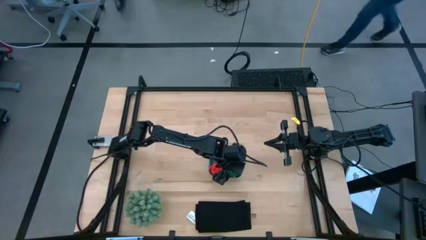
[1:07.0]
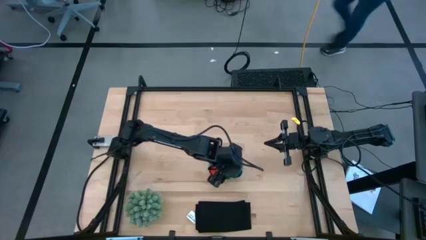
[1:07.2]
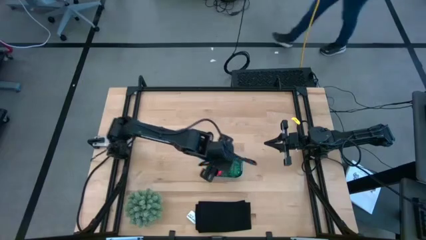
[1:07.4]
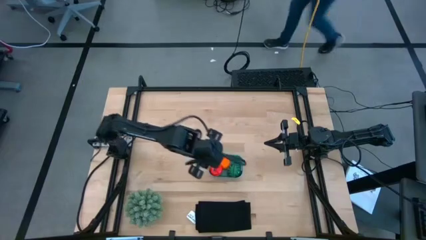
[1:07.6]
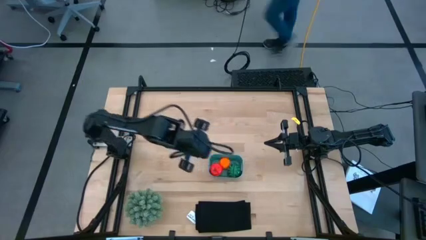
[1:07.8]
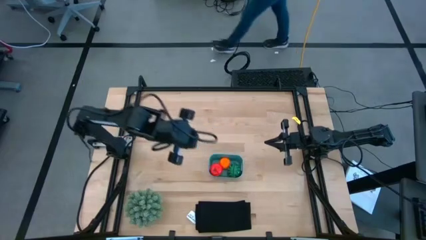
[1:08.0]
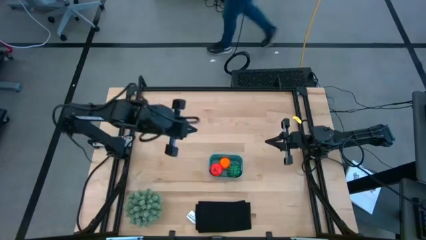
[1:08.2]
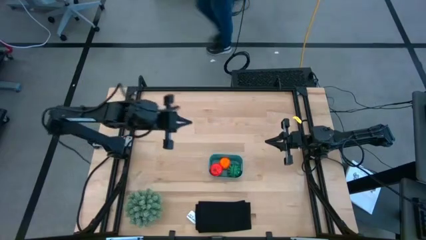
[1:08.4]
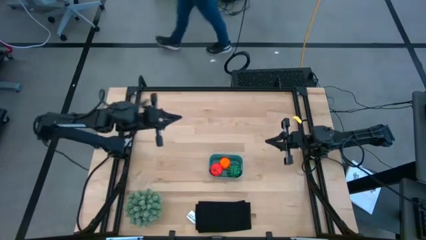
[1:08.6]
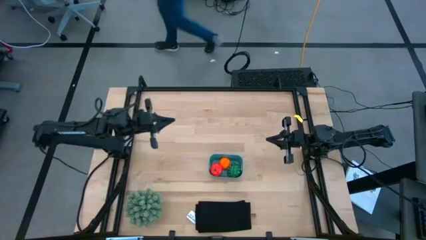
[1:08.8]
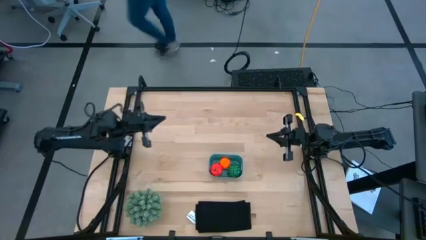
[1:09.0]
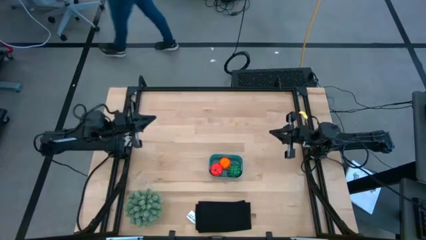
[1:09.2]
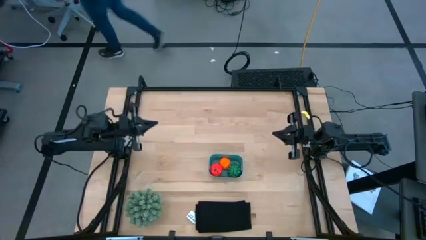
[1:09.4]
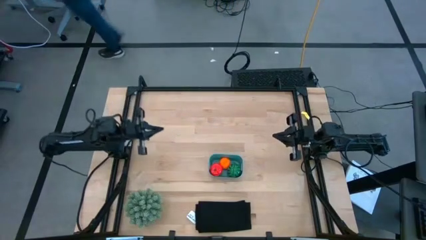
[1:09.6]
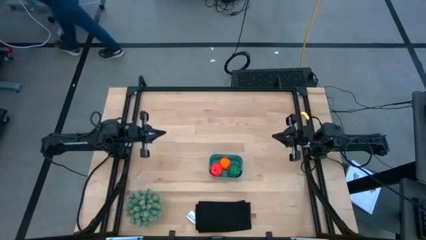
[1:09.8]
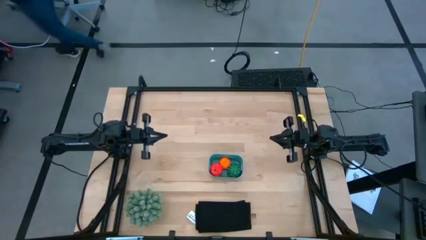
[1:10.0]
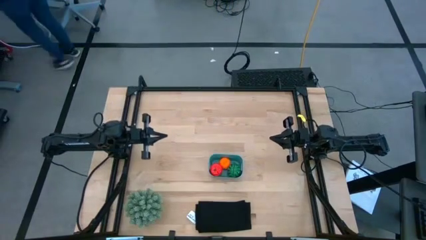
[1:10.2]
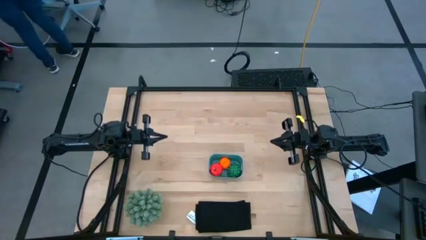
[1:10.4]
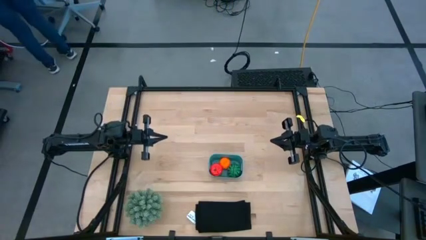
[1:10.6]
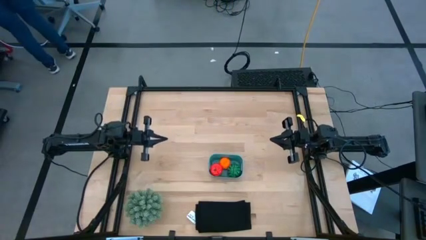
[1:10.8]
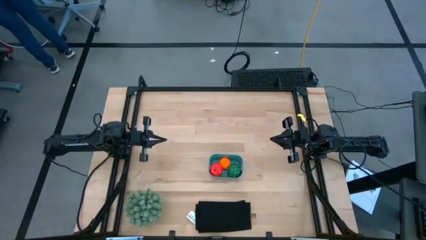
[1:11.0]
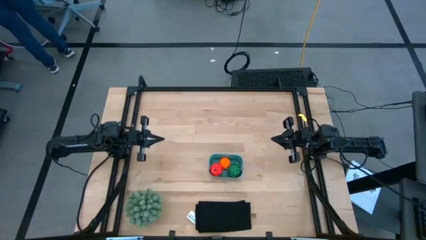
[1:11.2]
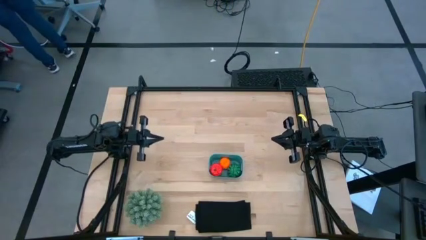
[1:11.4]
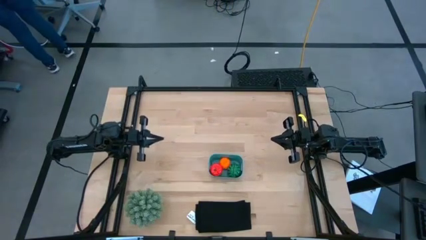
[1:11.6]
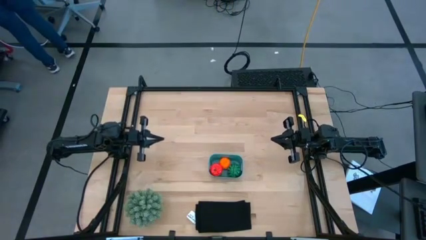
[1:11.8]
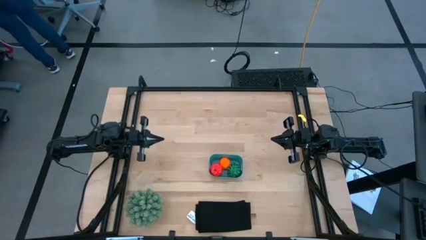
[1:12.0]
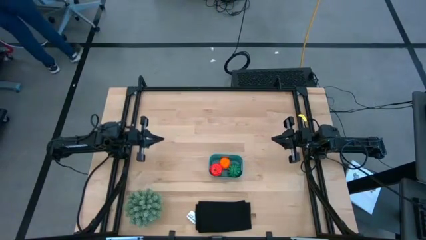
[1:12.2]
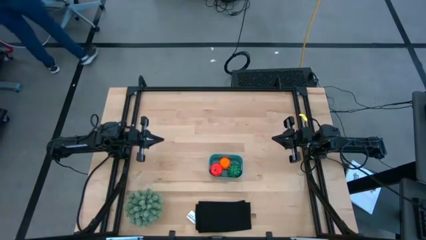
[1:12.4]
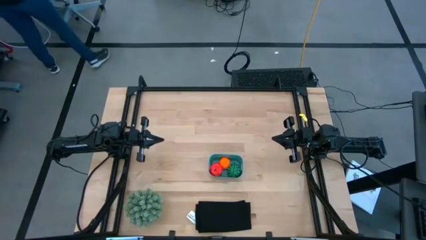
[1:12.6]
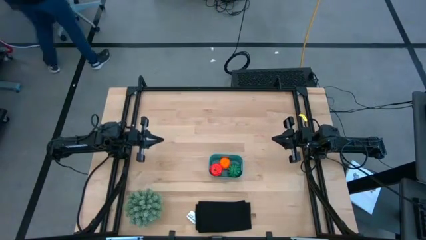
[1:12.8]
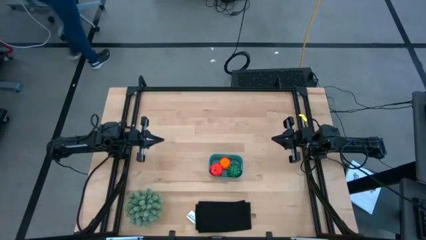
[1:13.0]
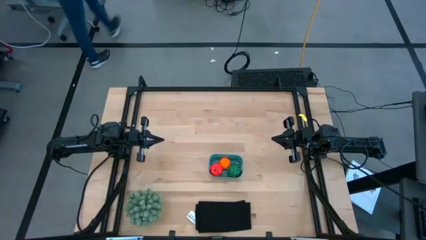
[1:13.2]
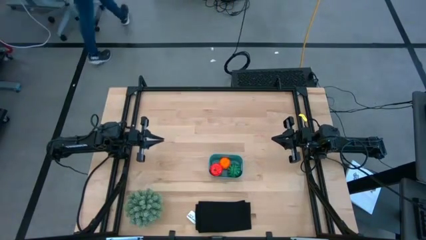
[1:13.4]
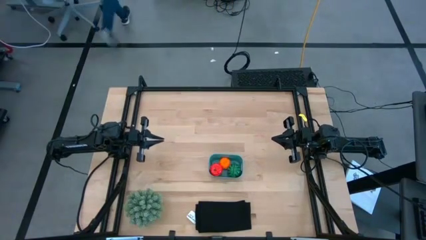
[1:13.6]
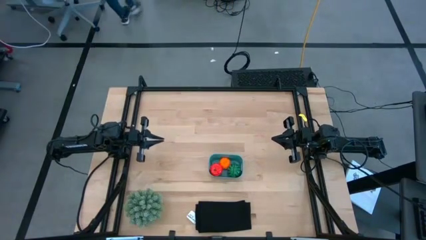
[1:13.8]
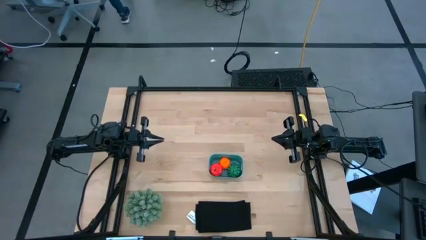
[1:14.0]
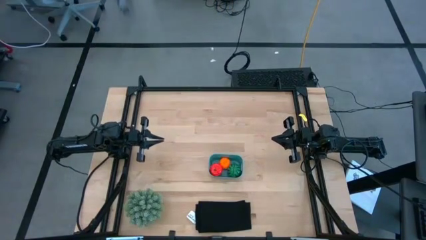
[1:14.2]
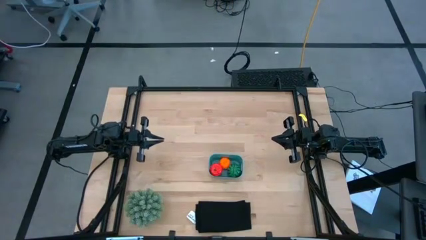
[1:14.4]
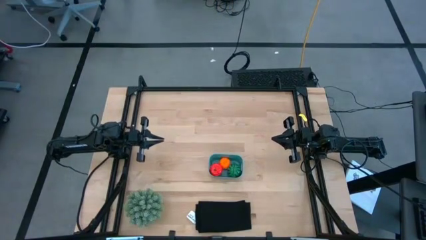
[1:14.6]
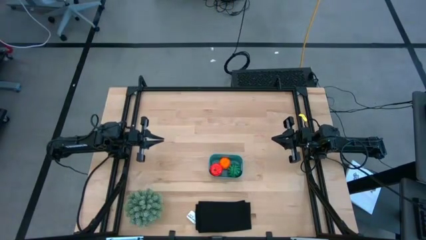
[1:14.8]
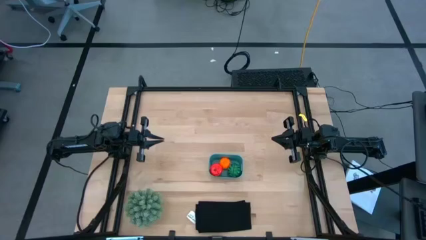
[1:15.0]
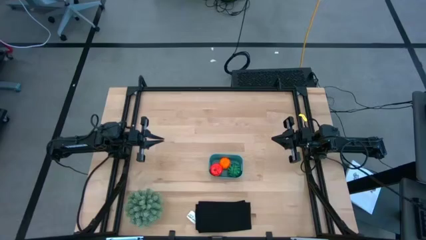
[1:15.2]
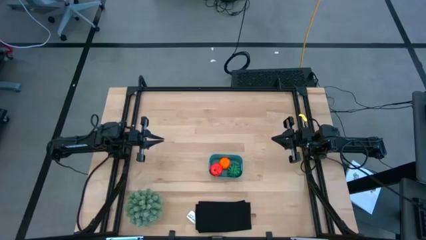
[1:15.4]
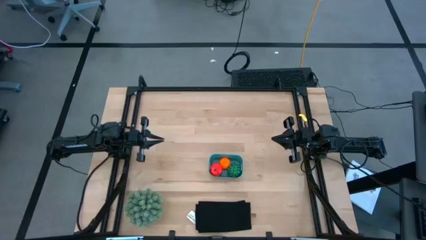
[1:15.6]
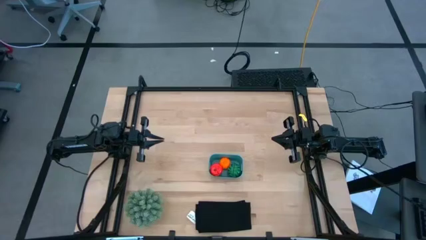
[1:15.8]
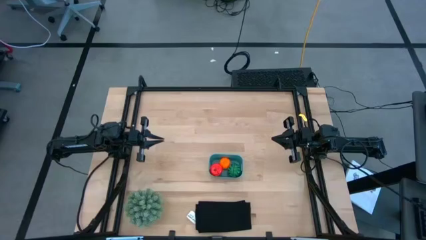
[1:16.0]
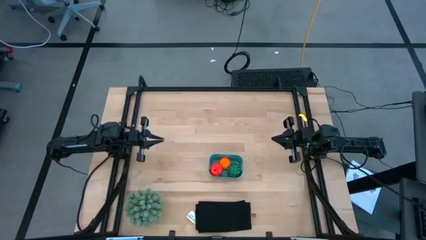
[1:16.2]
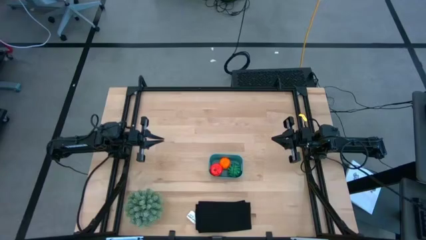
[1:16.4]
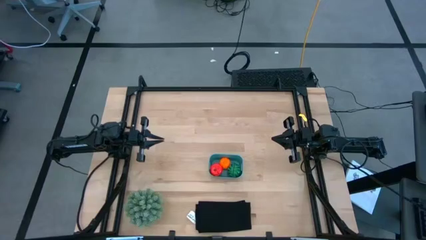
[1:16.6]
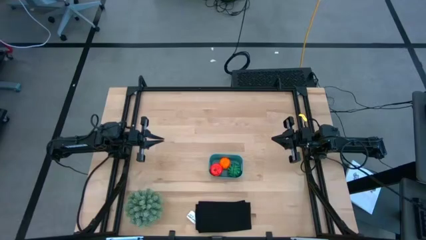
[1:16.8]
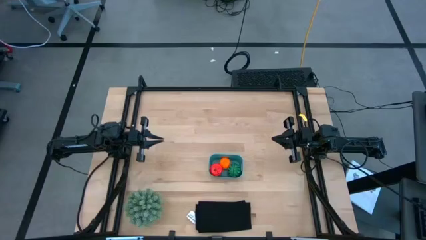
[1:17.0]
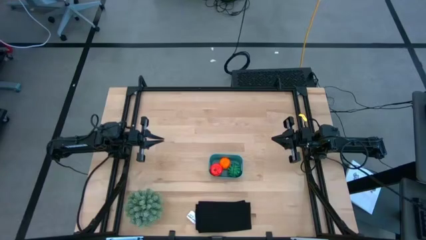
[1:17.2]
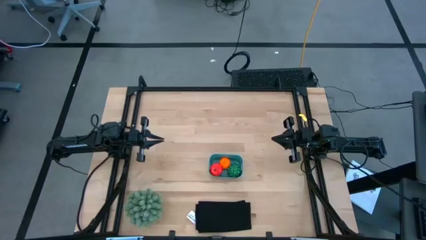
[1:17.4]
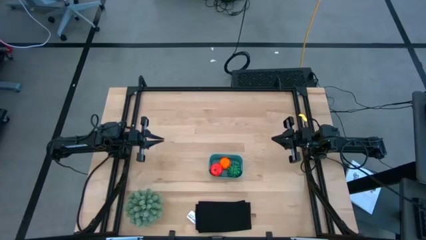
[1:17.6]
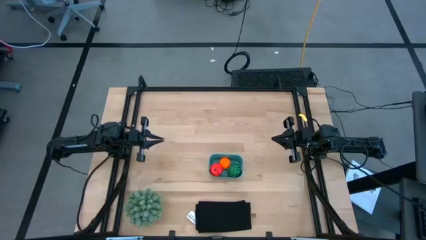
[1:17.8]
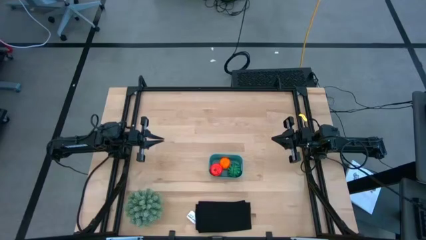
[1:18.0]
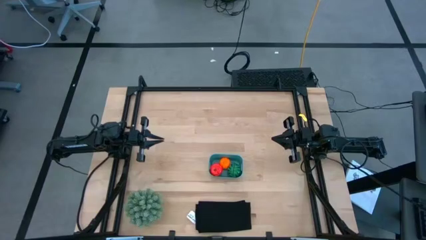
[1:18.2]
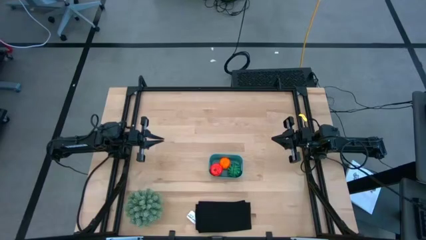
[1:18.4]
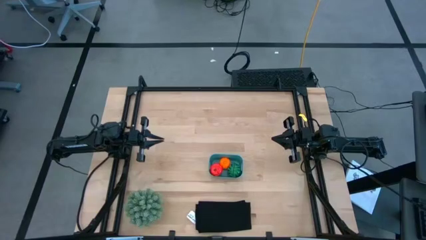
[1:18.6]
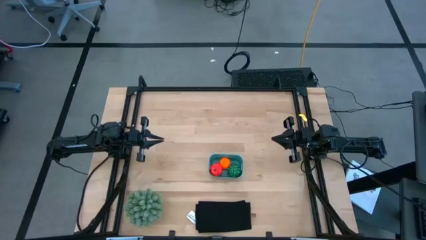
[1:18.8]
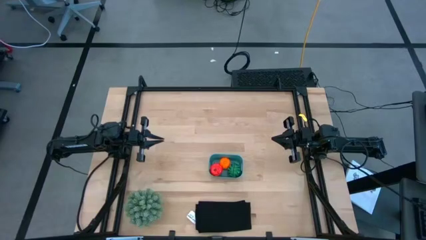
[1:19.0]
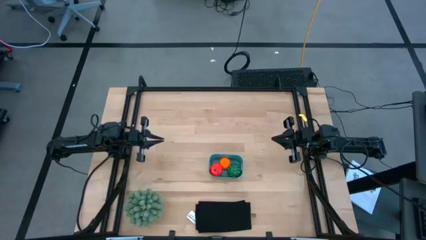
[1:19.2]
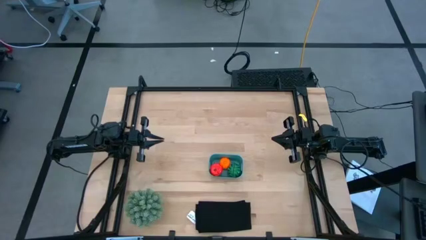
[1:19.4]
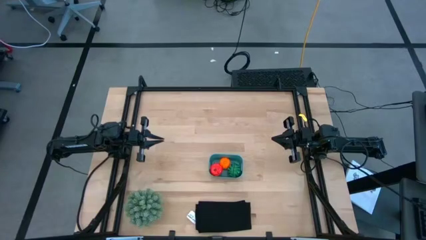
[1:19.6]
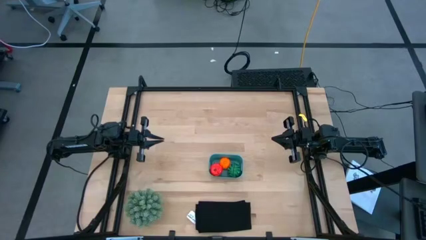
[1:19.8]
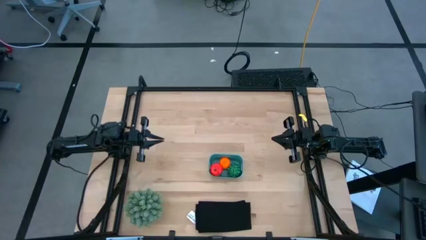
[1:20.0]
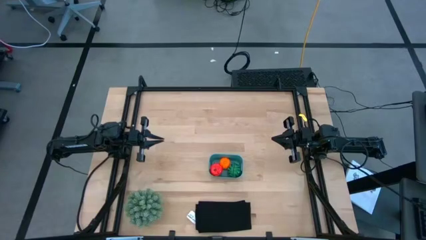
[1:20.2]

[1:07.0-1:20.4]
Task: Pick and placing Produce into tupperware
Return to Home Position

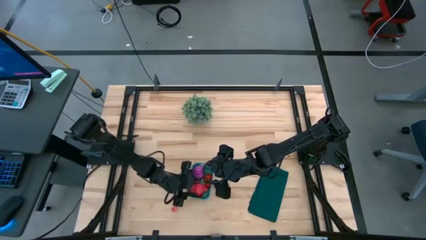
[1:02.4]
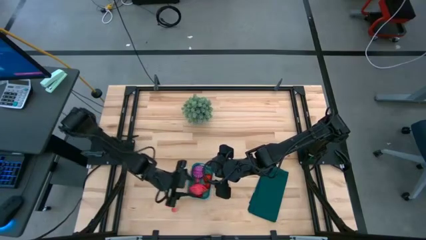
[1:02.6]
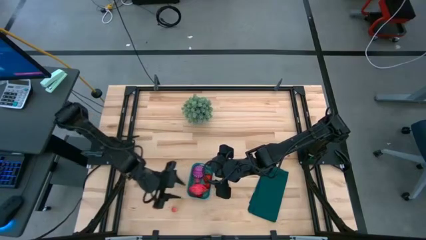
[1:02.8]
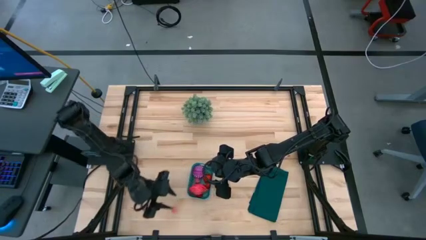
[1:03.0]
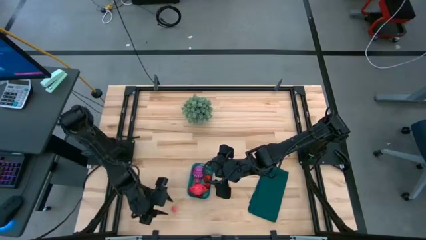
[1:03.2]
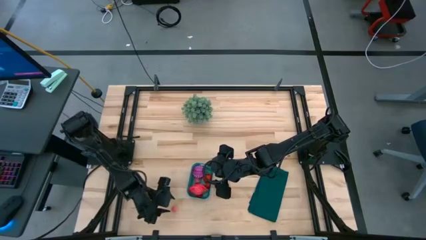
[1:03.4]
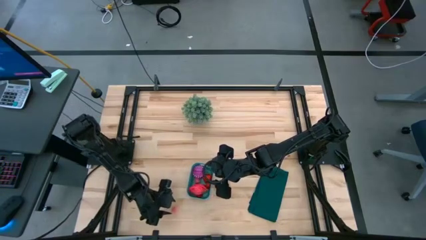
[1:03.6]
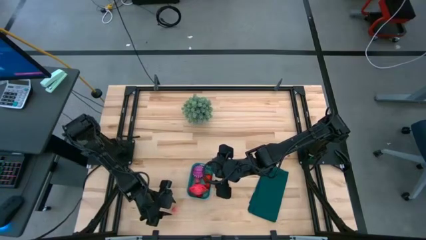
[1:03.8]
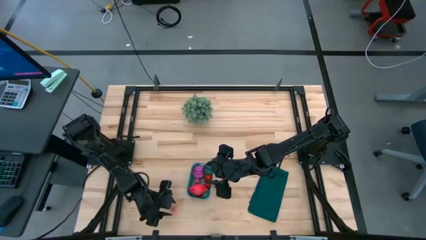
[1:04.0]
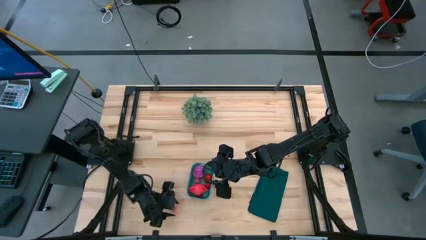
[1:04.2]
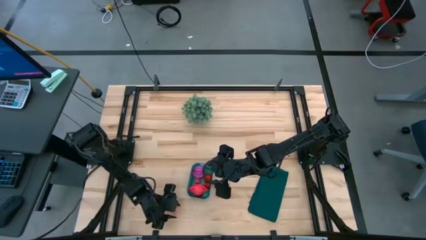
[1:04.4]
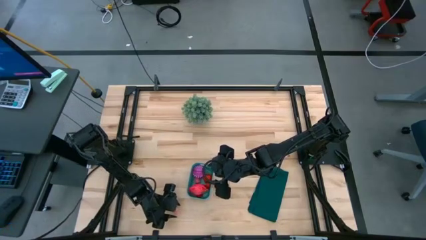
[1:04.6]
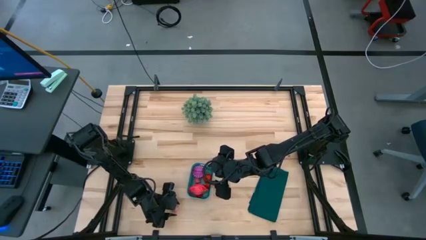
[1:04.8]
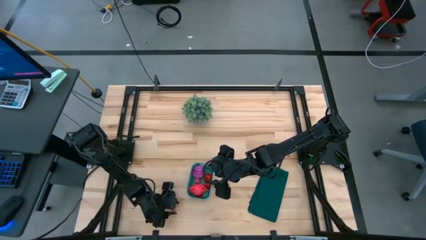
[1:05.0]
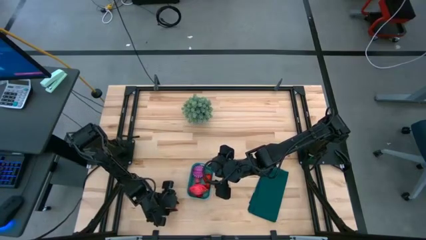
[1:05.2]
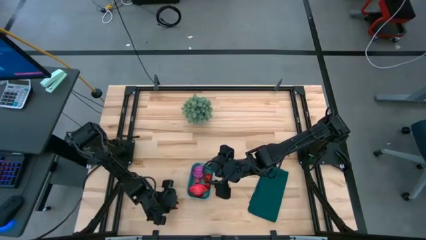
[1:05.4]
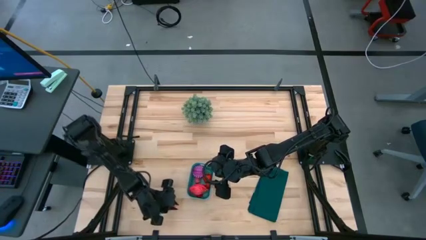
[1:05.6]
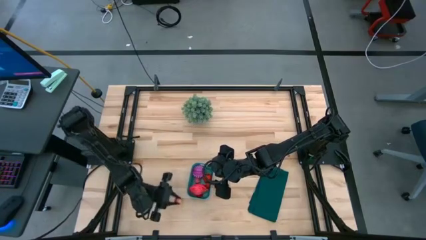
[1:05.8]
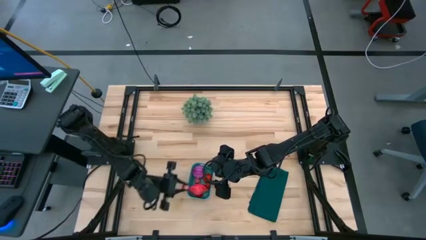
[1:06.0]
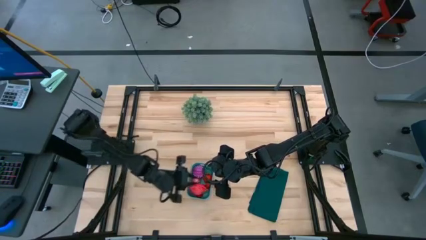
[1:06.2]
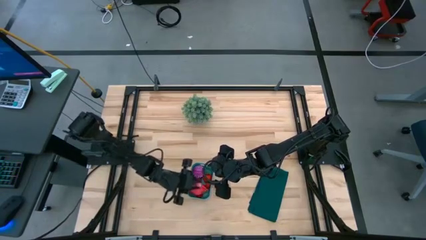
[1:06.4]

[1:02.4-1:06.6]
Task: Pick and placing Produce into tupperware
Put the pink peach into the green bin
